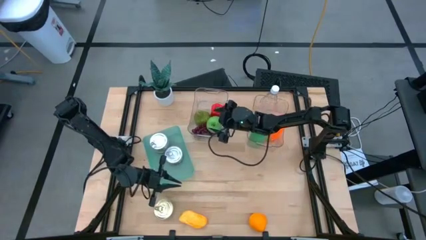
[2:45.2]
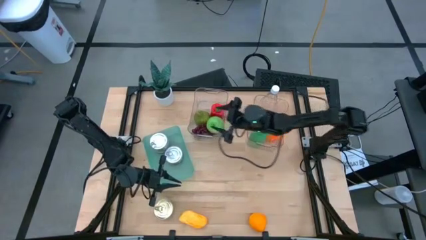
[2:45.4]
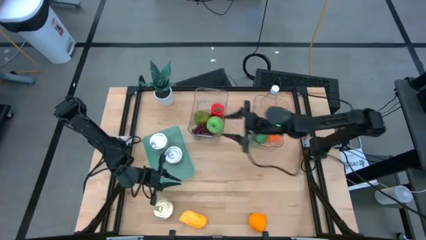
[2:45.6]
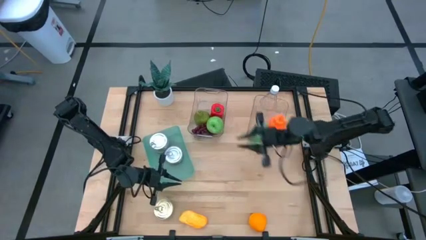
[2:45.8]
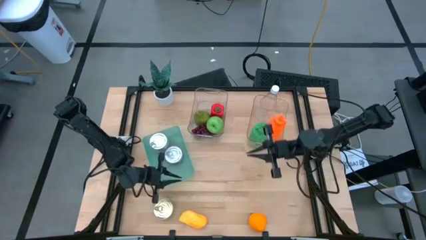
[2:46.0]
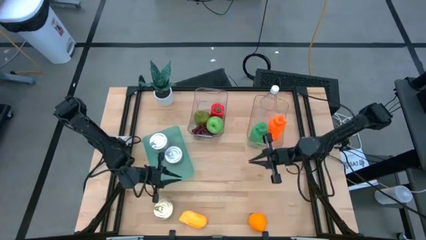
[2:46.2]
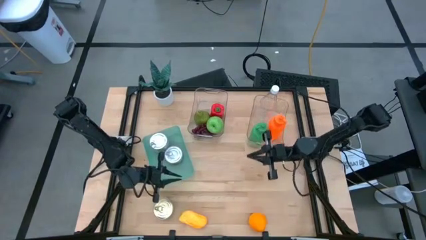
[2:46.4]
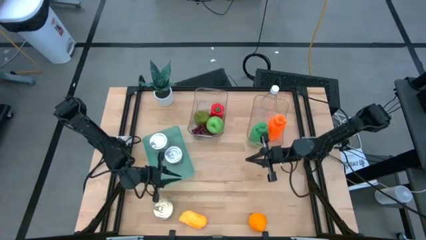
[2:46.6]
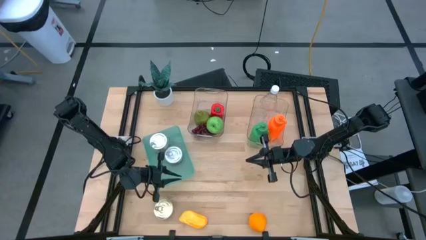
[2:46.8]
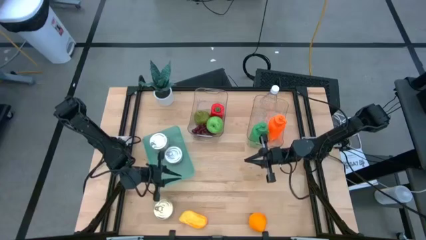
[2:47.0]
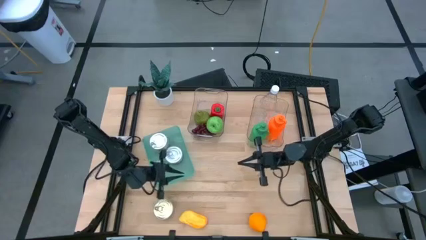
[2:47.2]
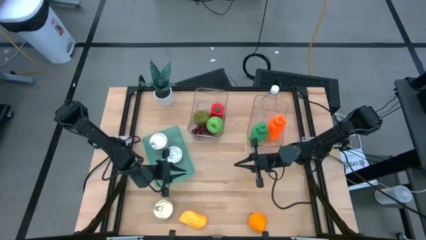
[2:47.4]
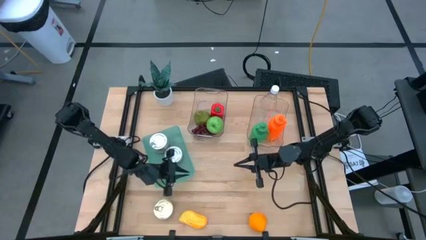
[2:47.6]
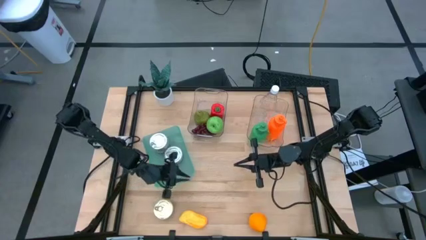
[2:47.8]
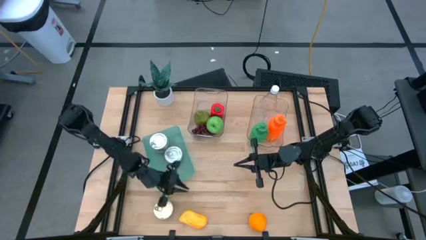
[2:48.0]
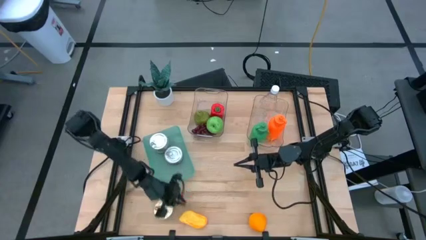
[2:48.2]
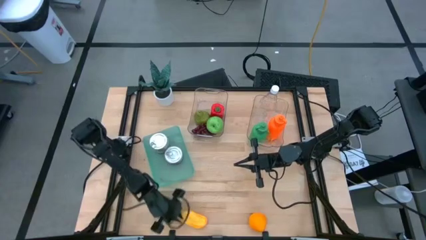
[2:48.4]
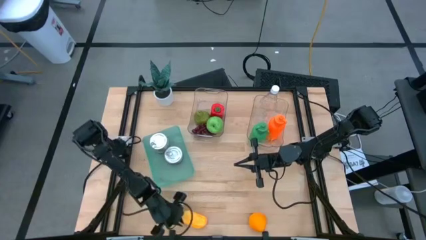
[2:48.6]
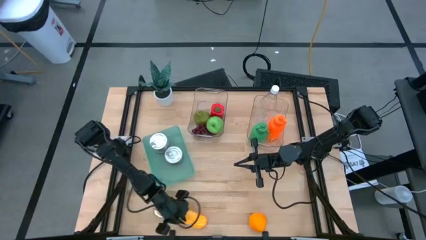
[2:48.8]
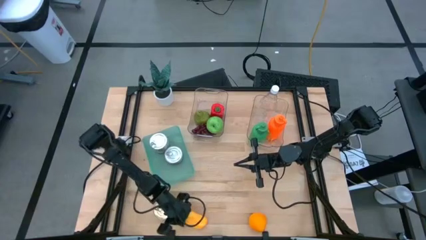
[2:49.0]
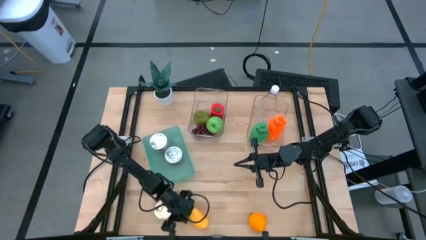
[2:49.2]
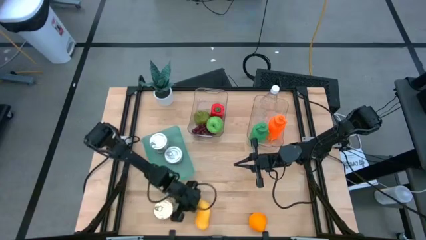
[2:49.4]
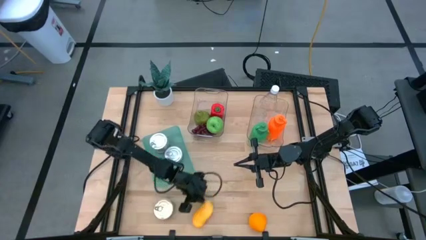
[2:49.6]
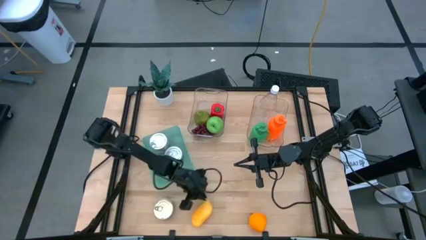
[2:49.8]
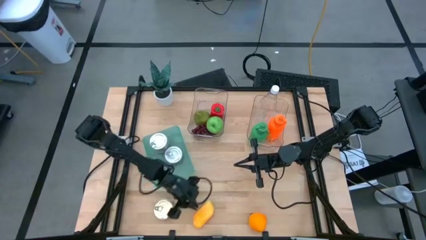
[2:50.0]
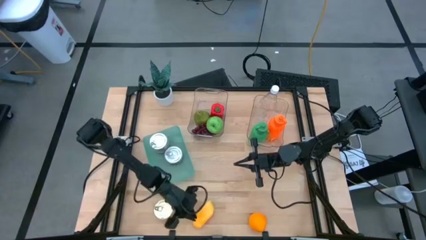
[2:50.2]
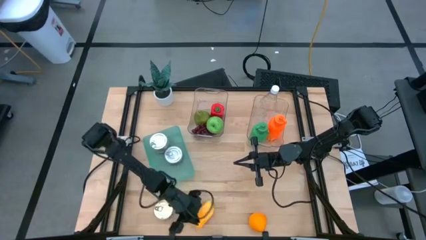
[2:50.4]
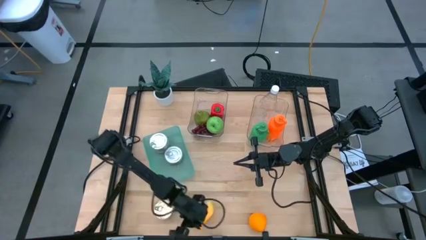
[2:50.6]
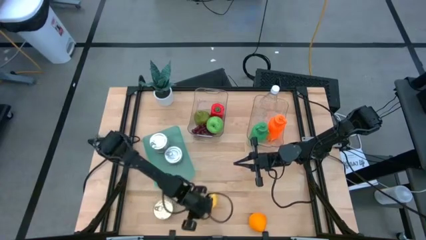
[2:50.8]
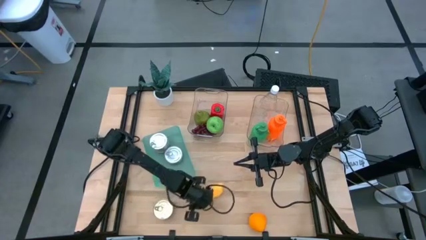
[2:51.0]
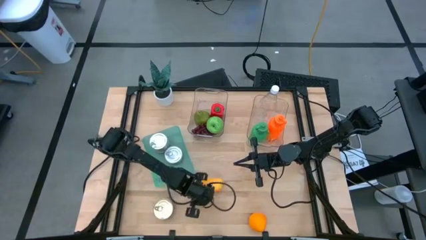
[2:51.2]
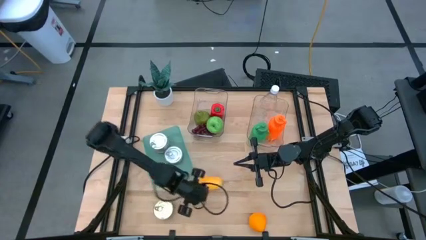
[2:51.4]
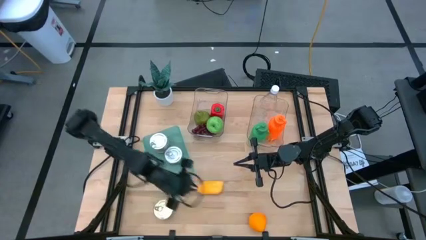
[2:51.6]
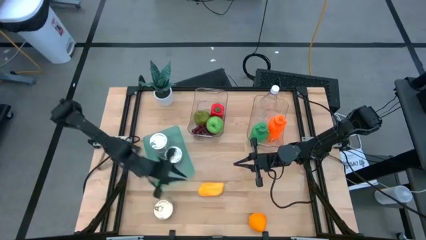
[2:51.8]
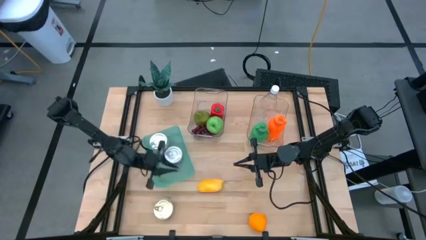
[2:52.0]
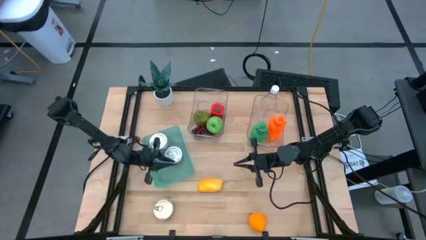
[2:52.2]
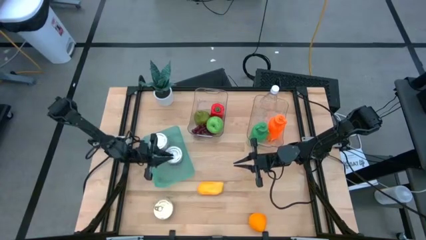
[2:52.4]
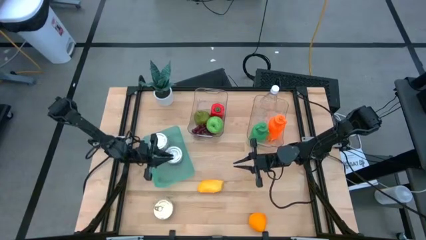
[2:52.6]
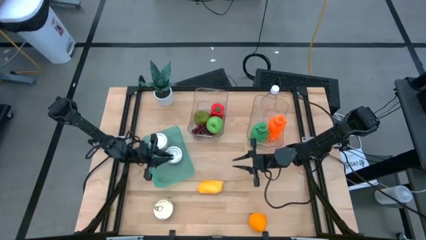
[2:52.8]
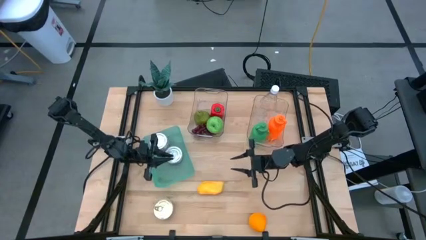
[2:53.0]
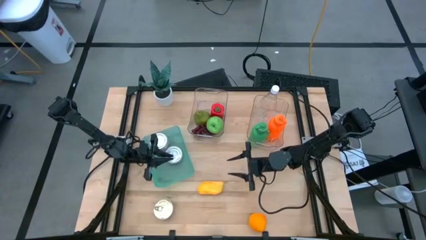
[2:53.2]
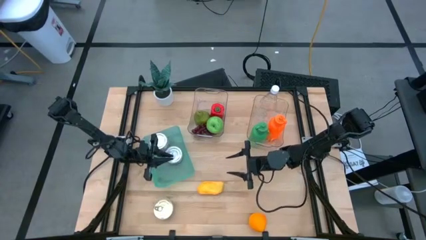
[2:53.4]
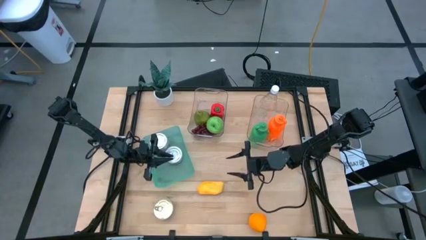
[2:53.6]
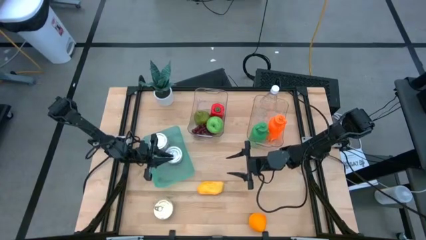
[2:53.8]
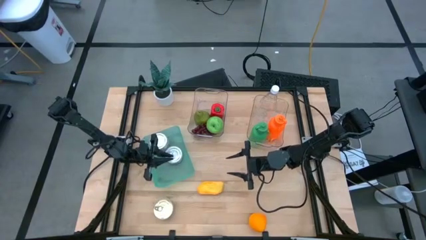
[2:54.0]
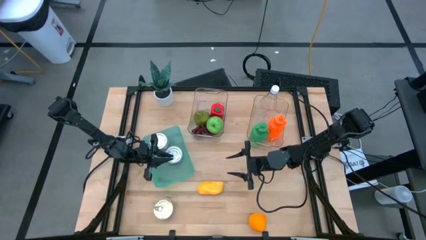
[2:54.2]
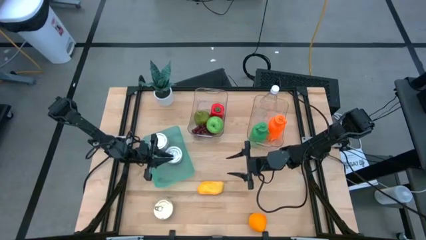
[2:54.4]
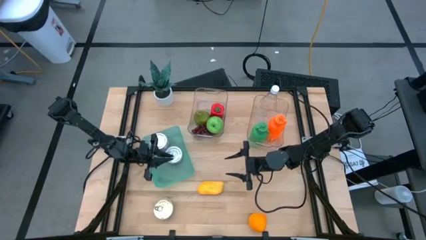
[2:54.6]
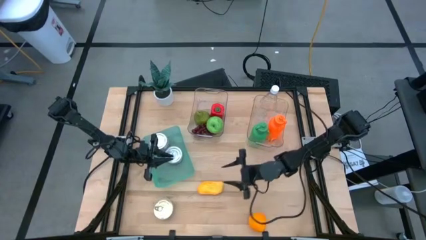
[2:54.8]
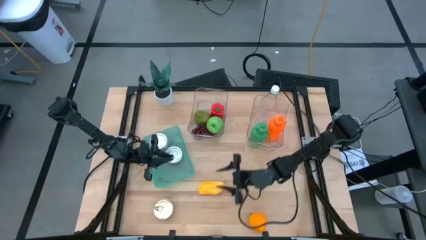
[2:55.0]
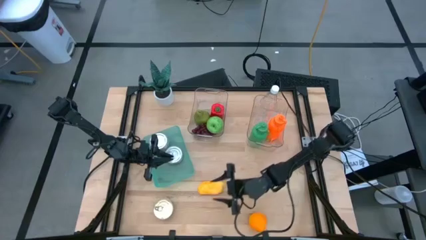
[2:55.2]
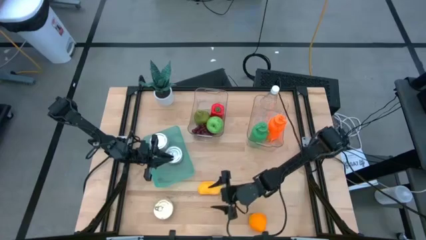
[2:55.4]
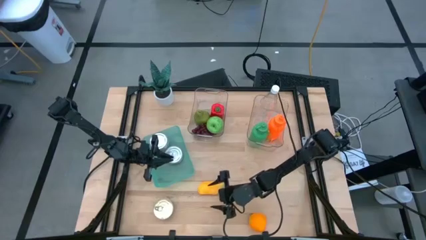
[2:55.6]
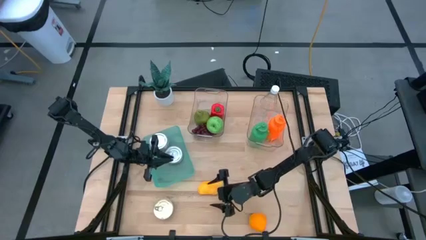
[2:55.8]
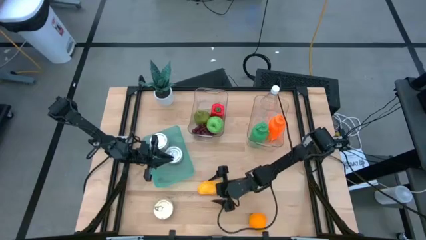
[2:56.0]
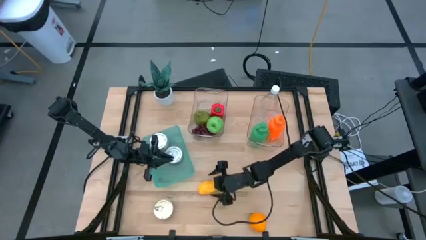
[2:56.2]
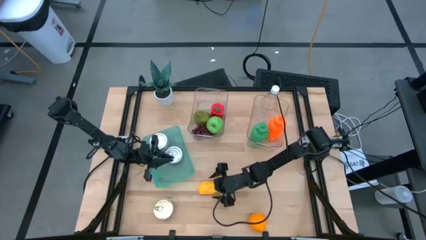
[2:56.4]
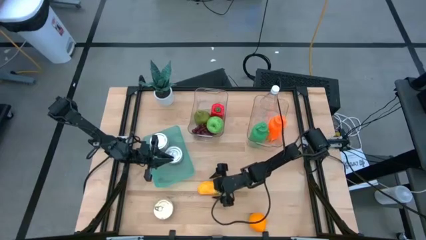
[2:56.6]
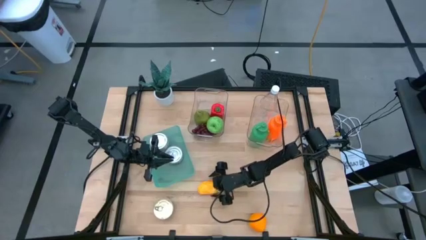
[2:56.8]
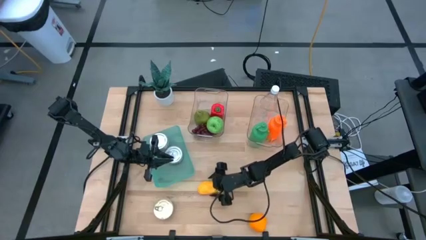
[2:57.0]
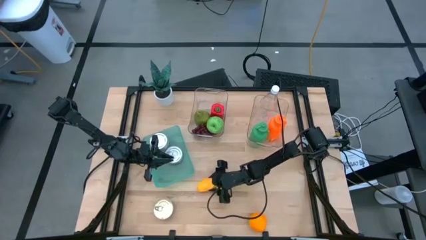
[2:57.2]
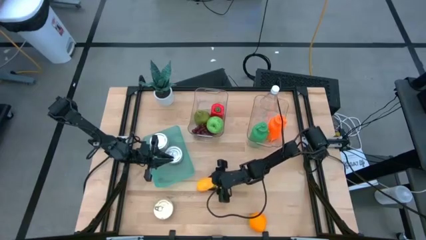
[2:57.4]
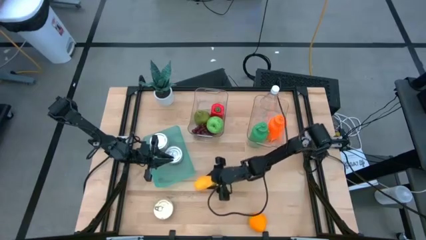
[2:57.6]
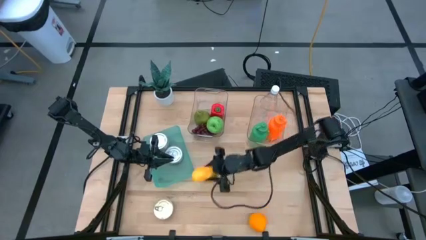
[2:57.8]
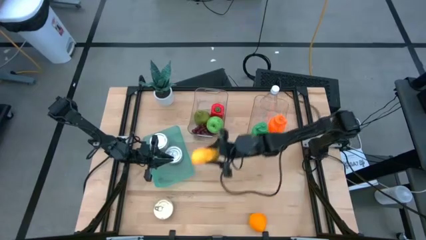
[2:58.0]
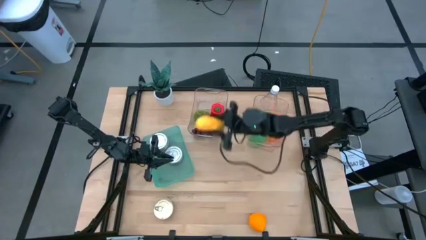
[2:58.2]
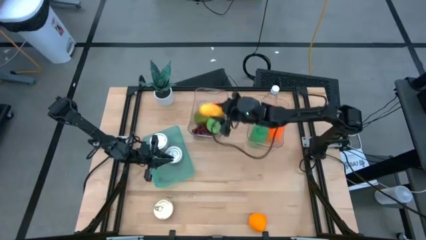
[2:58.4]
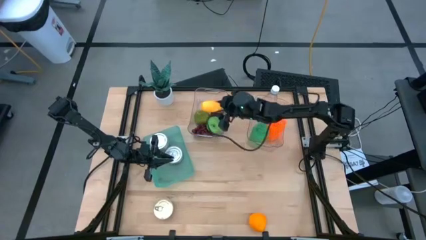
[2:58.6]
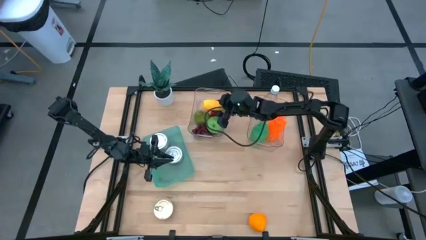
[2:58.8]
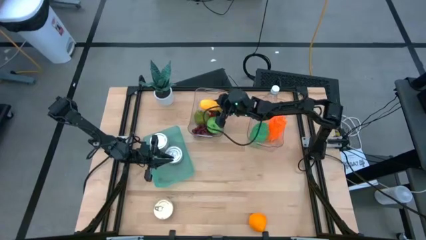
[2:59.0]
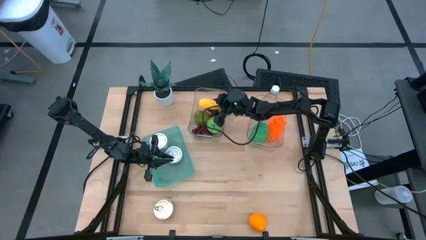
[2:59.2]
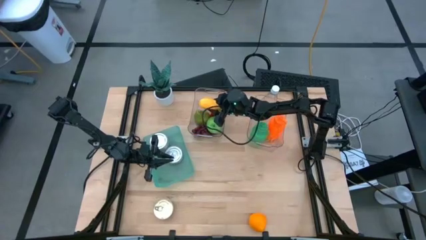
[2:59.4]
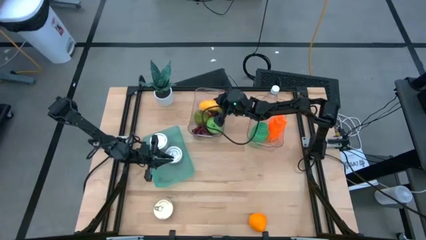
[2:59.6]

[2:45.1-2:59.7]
Task: Pick & Place Food Item
Put the mango into the left transparent bin
